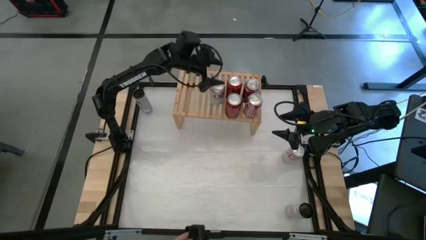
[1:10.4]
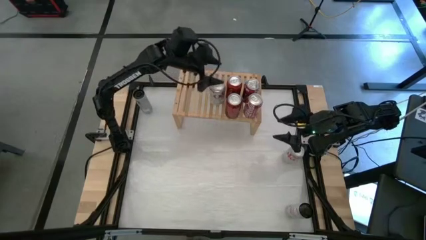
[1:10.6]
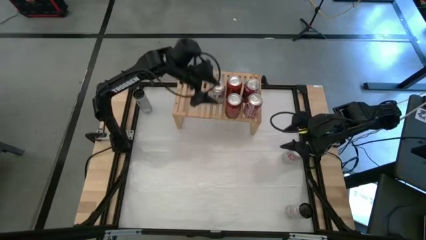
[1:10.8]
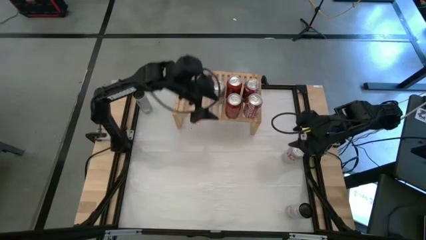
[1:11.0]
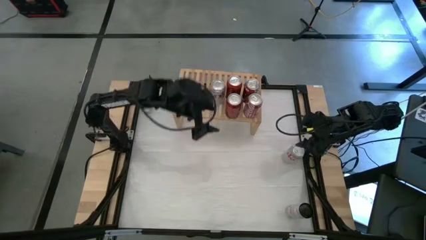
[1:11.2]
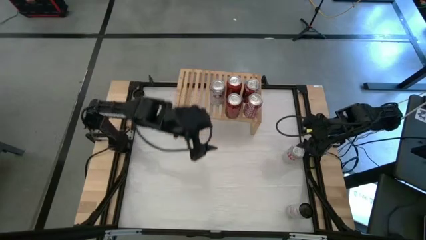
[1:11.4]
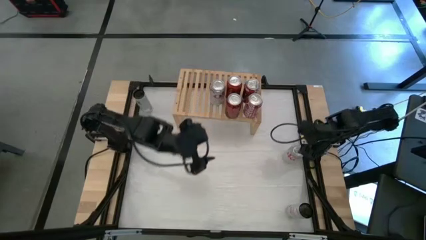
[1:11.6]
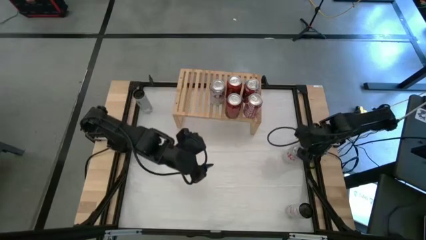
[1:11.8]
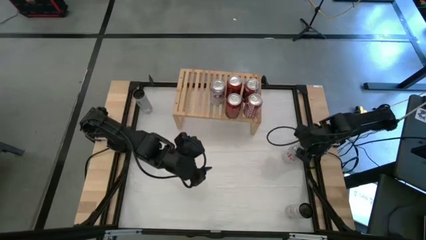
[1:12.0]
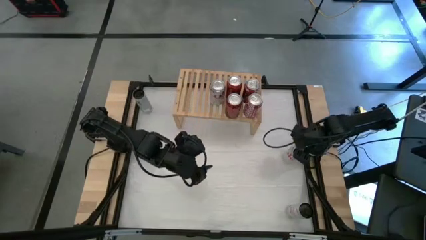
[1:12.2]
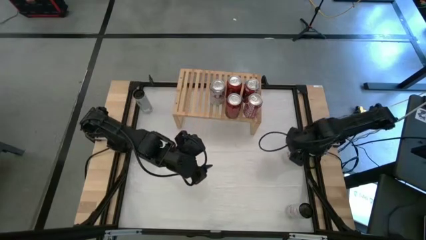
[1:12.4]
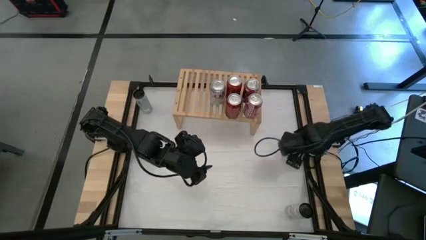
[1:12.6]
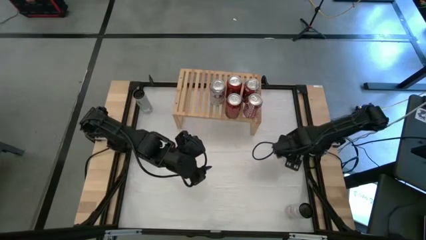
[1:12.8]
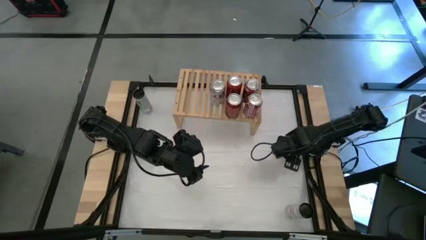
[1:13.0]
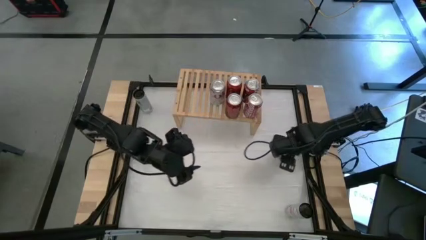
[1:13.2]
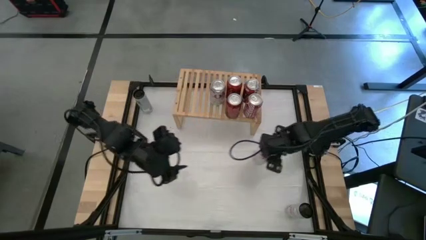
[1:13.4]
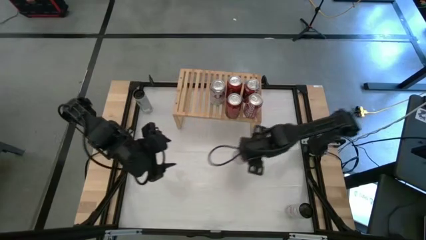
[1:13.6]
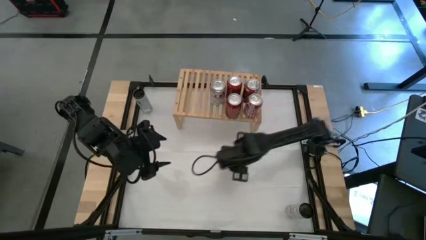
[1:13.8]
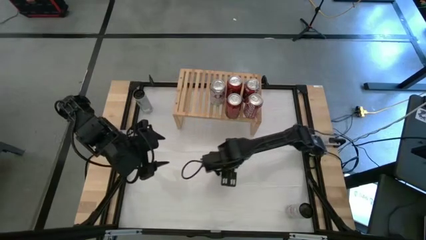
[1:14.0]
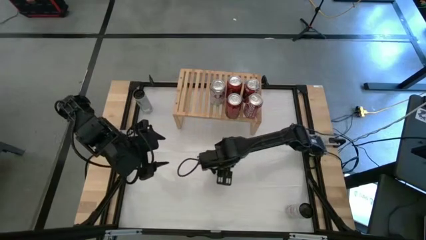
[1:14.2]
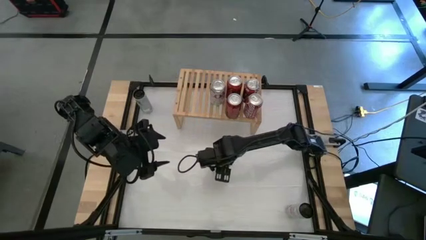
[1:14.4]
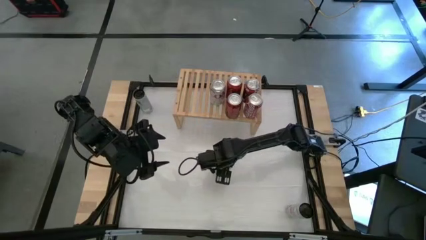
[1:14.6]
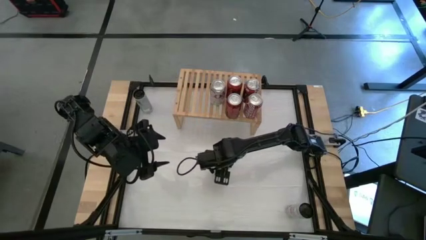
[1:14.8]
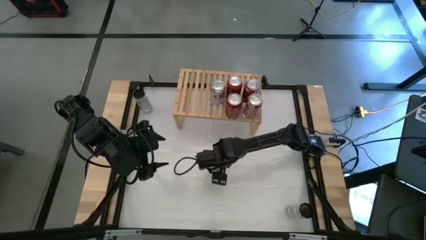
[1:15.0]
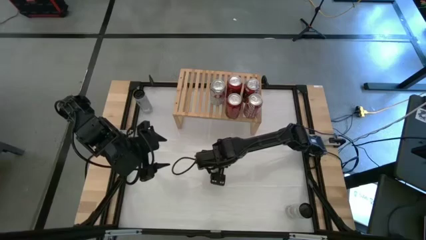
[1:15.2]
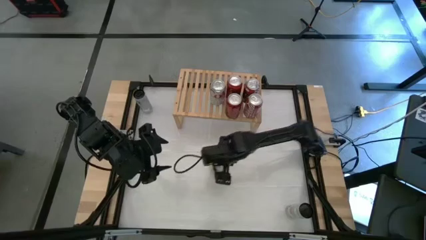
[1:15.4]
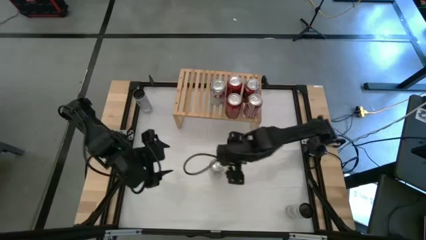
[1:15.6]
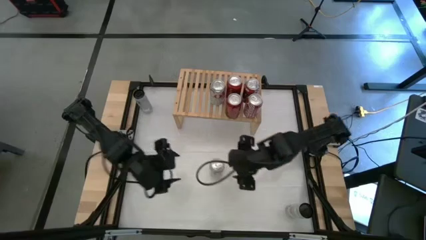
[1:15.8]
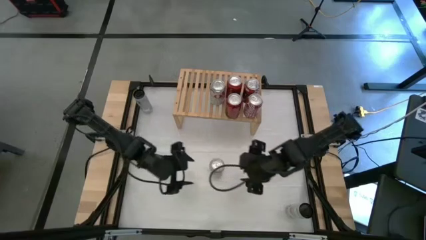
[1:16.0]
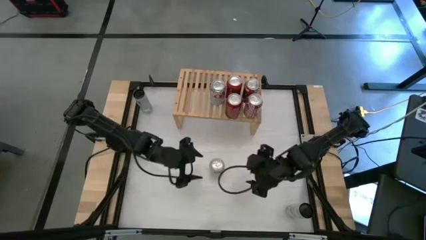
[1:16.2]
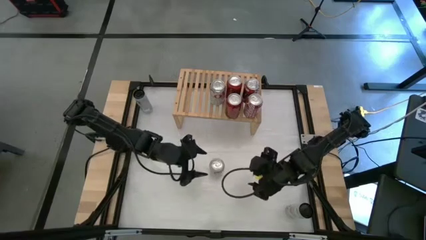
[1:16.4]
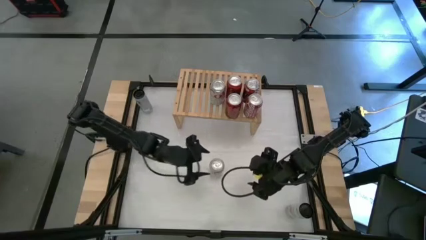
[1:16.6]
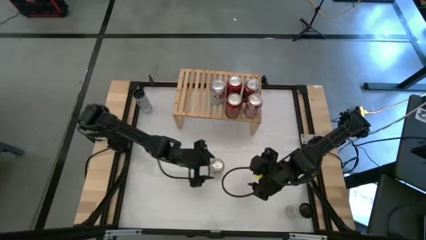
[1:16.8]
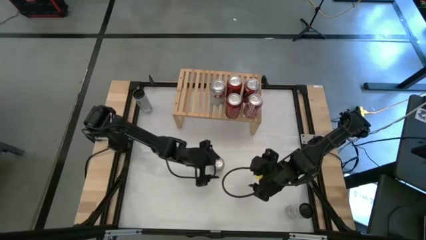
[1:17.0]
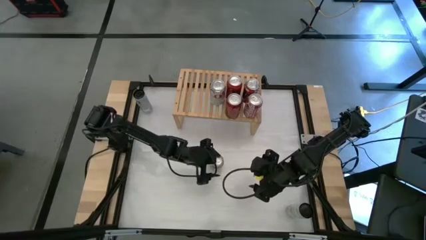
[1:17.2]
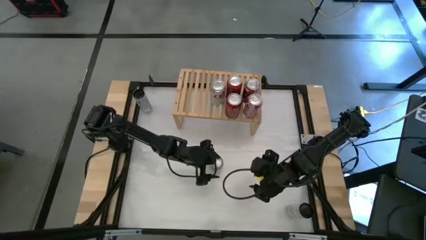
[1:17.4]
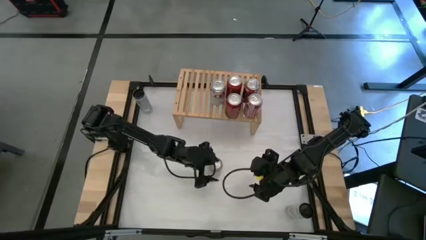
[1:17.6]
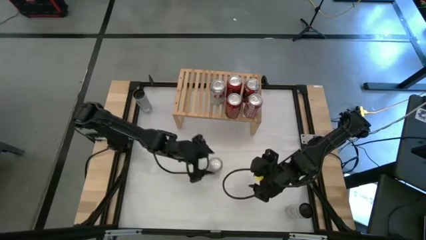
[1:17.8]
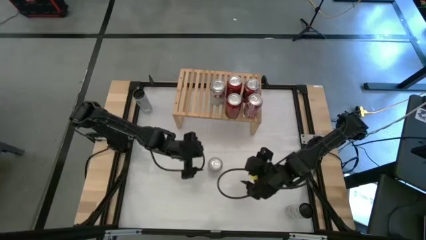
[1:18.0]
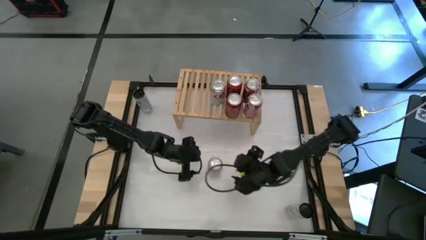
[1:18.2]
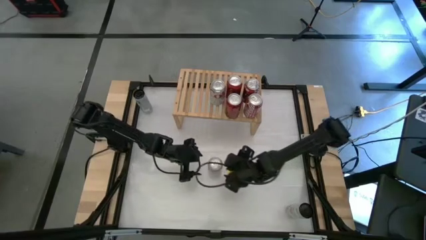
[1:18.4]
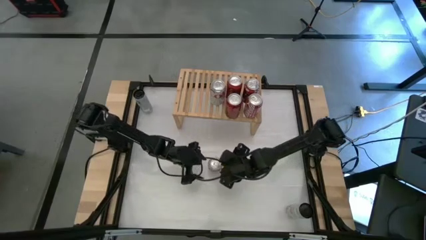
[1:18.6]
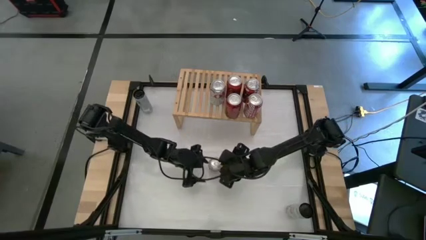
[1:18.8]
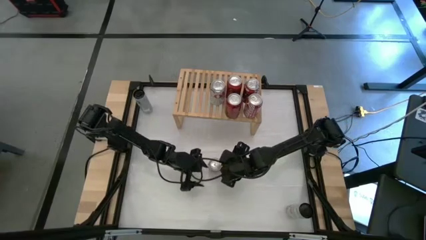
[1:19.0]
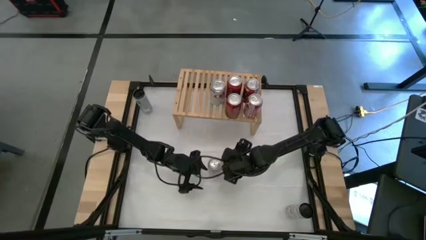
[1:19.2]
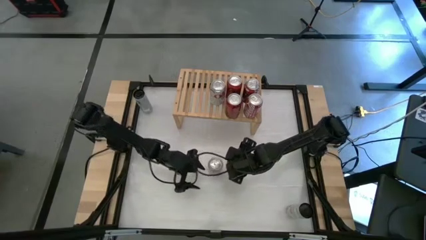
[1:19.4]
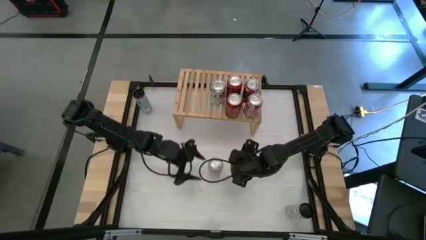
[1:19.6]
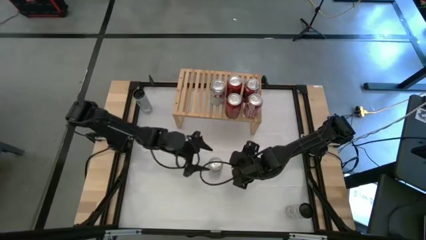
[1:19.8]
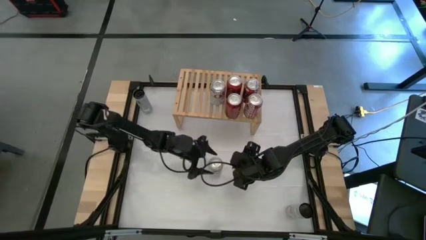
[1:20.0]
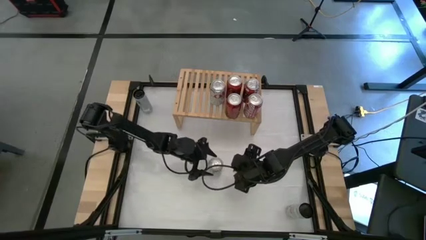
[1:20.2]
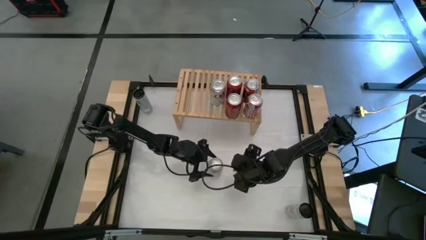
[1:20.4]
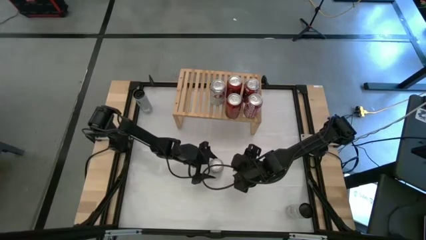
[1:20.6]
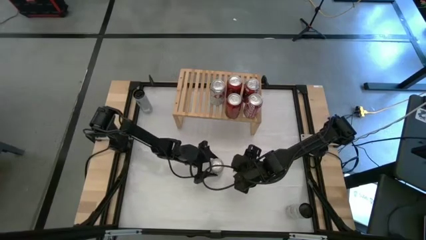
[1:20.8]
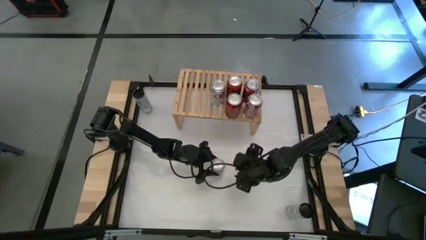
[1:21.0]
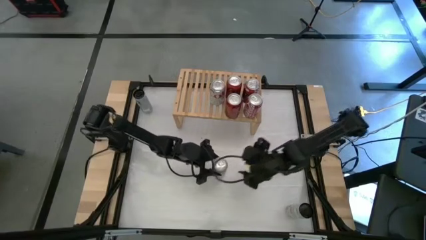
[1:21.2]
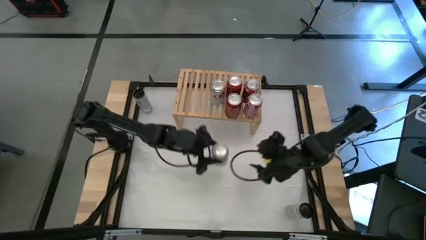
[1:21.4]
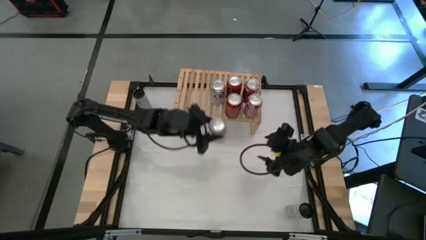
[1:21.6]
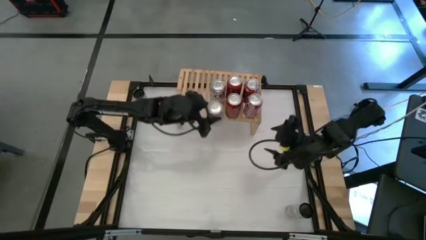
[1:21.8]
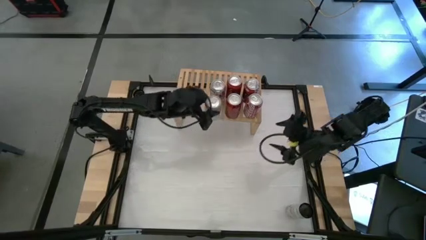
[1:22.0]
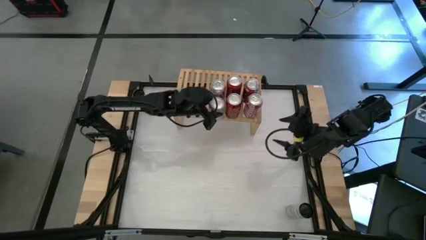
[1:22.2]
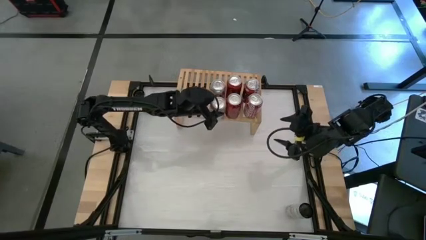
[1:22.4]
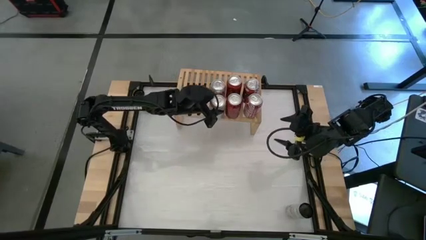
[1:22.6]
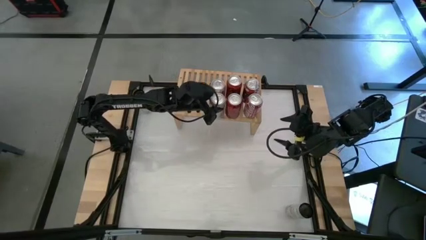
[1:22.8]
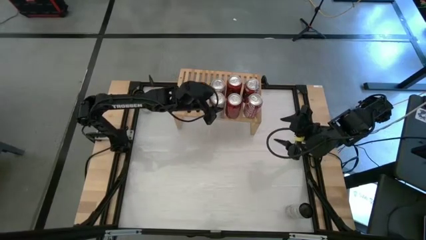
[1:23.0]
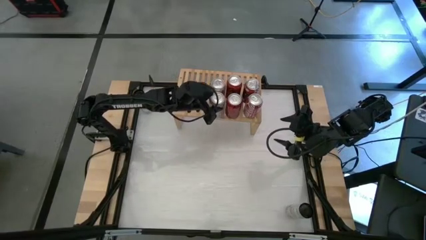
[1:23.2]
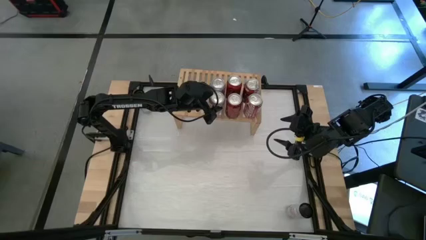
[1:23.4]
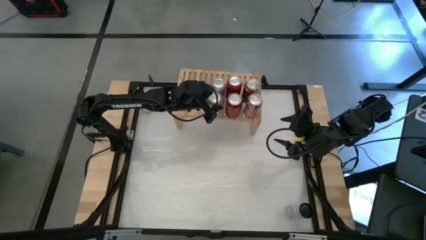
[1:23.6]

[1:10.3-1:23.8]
Task: Place canned beverage on shelf
Put the silver soda can on the shelf aligned with the other silver soda can

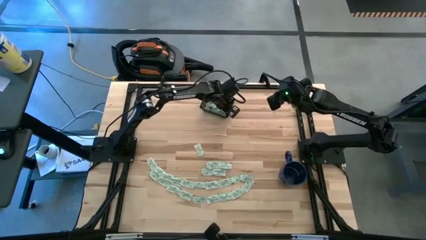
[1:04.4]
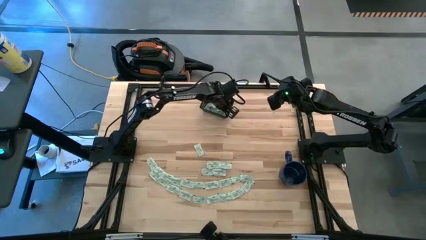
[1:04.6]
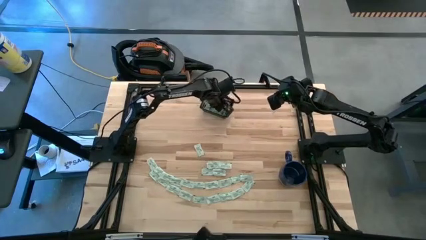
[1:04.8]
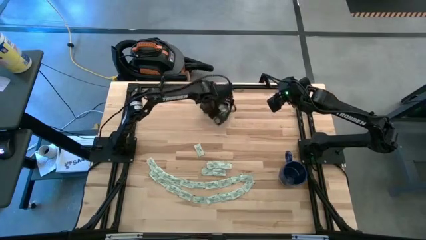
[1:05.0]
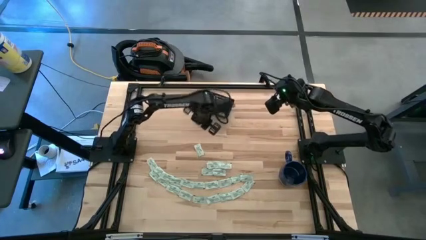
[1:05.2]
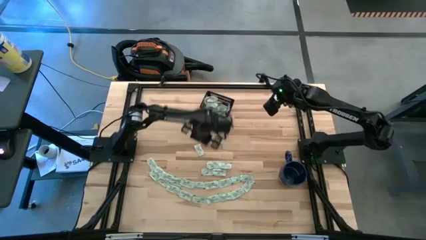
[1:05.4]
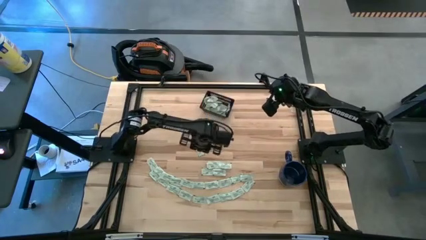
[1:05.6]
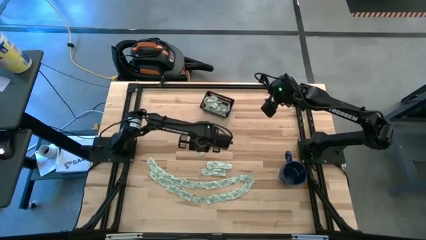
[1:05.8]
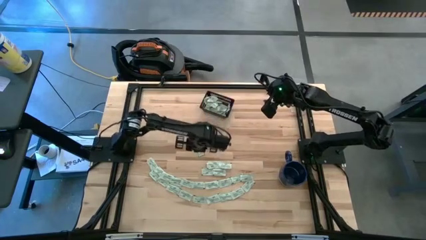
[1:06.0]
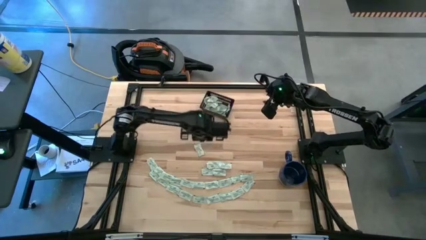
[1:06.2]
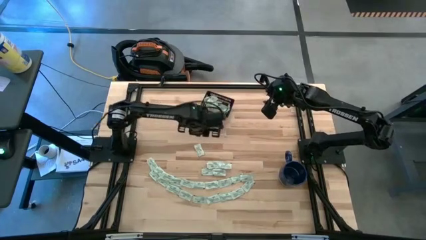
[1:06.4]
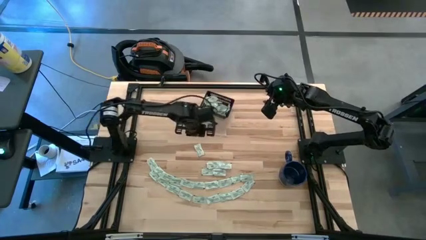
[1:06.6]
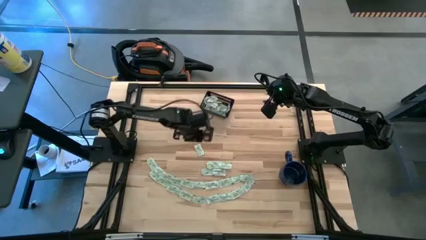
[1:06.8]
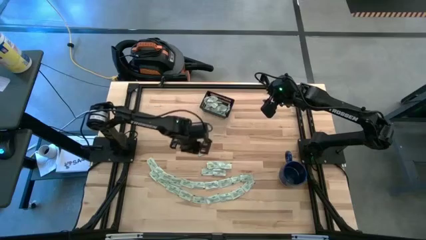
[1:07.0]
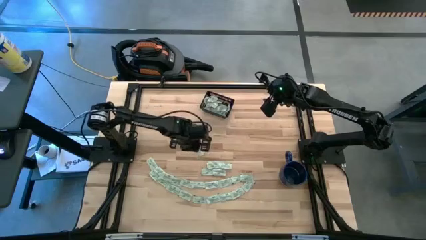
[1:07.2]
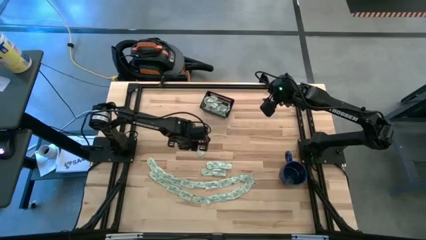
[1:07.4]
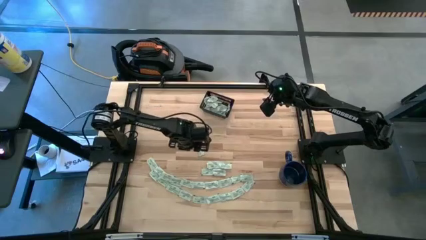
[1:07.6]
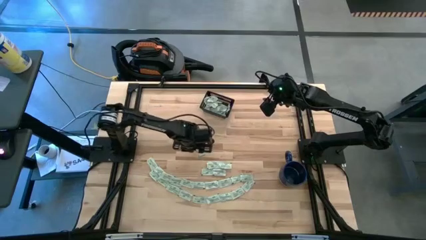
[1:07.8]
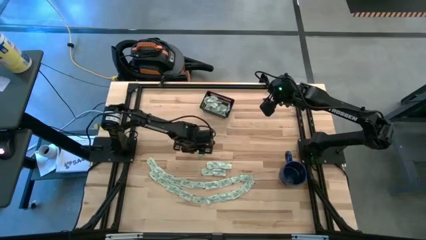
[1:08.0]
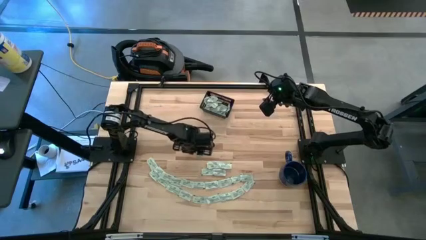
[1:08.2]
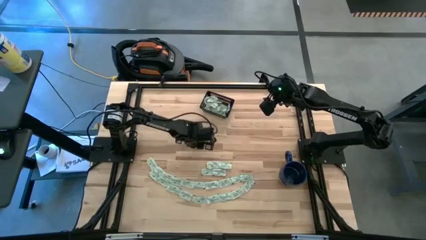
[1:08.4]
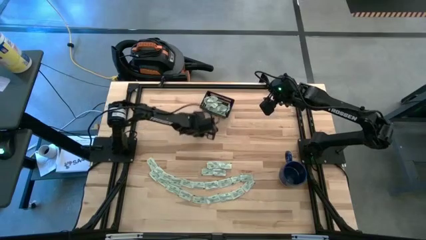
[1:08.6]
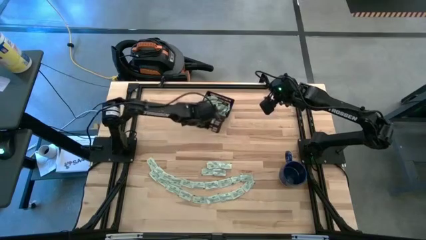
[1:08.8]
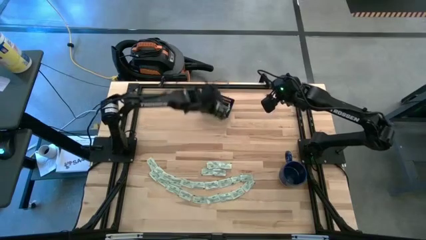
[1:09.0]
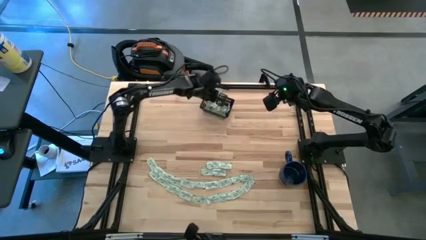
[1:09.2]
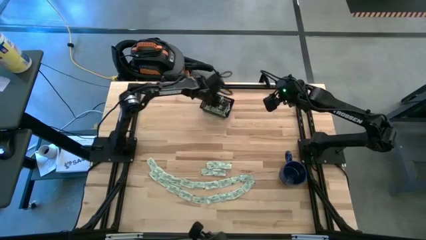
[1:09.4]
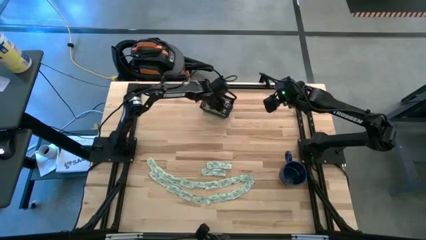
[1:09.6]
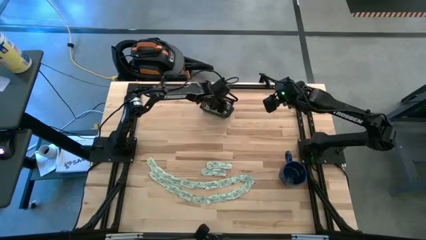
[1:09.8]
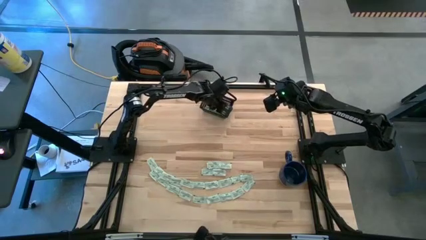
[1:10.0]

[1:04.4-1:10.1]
Task: Pick and place Stevia / Truvia into bins
Put the stevia packet into the black bin
